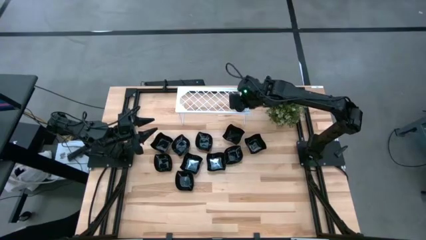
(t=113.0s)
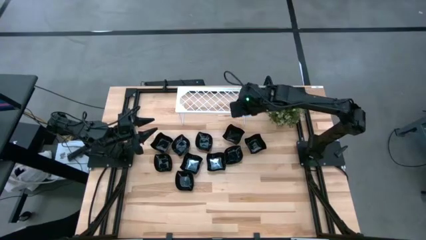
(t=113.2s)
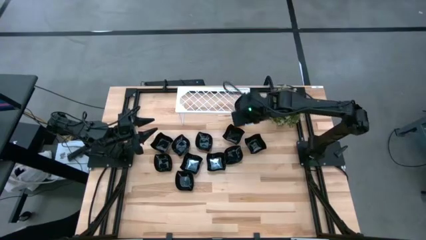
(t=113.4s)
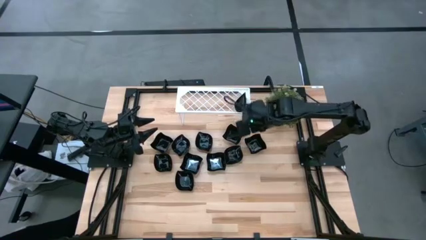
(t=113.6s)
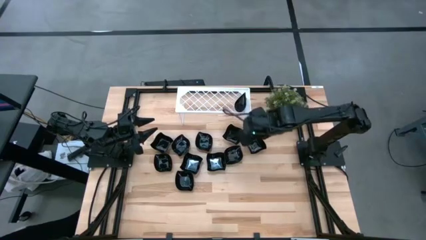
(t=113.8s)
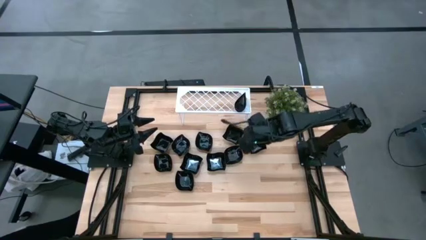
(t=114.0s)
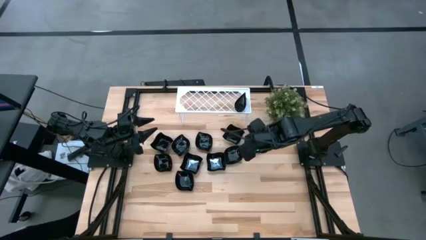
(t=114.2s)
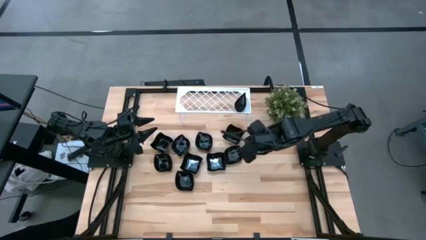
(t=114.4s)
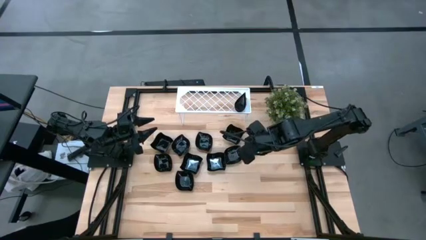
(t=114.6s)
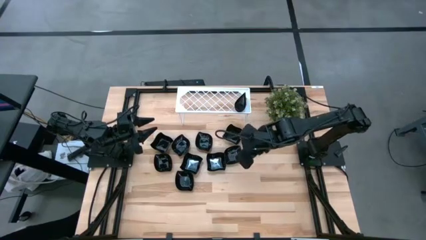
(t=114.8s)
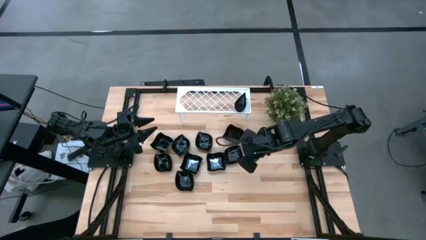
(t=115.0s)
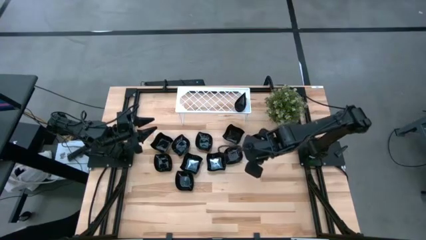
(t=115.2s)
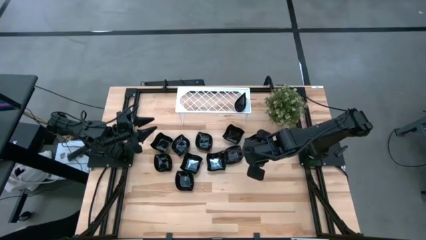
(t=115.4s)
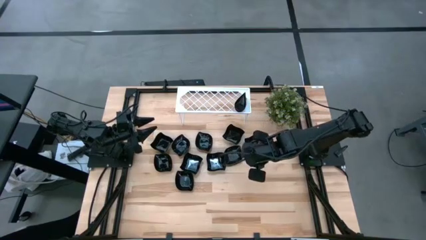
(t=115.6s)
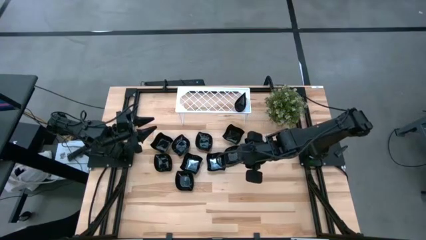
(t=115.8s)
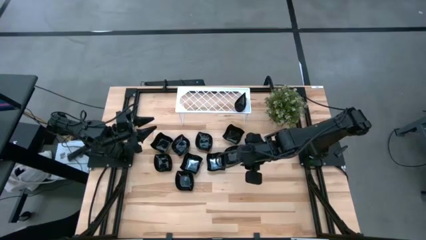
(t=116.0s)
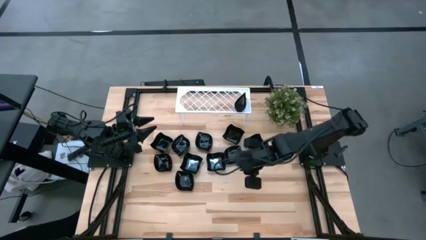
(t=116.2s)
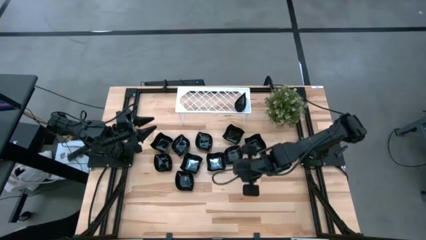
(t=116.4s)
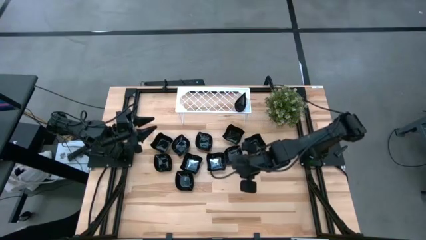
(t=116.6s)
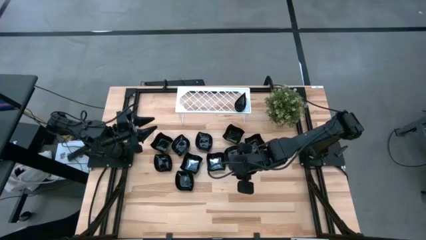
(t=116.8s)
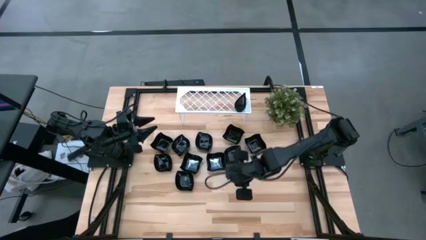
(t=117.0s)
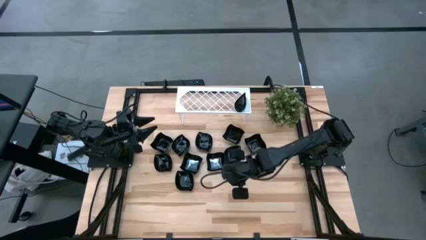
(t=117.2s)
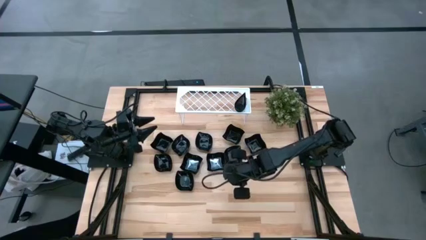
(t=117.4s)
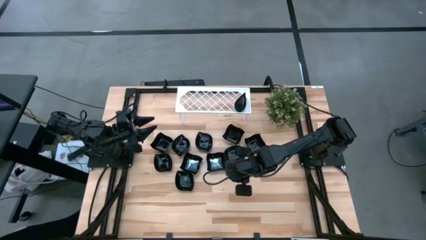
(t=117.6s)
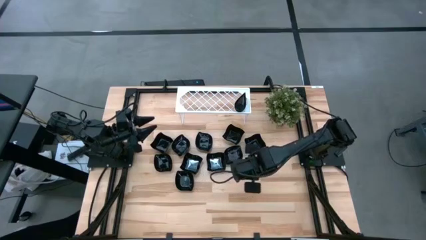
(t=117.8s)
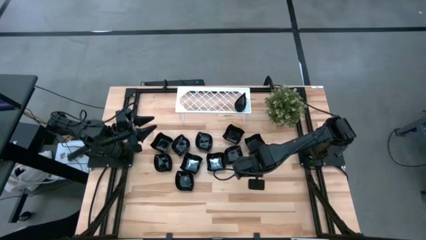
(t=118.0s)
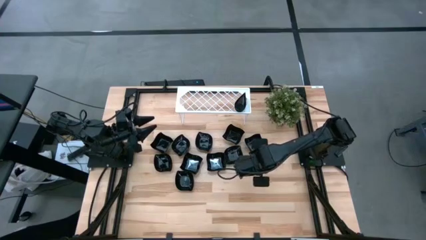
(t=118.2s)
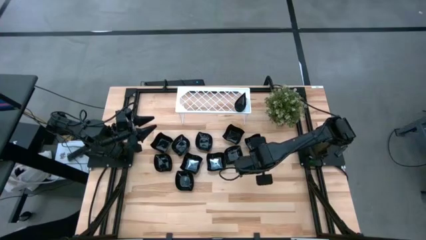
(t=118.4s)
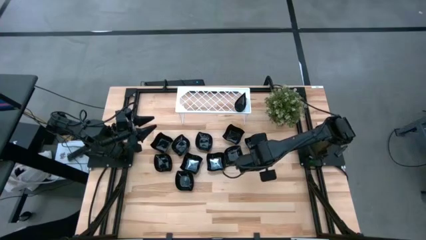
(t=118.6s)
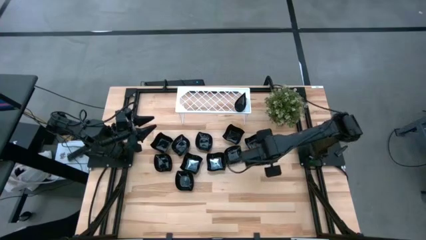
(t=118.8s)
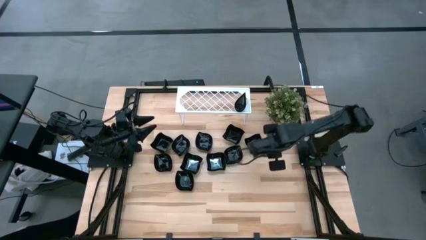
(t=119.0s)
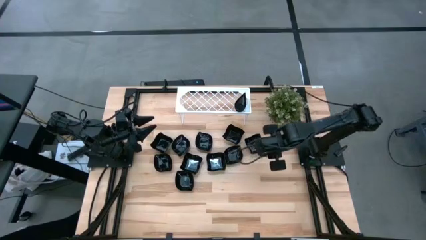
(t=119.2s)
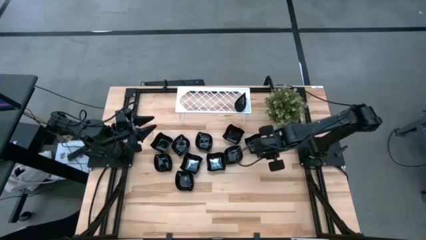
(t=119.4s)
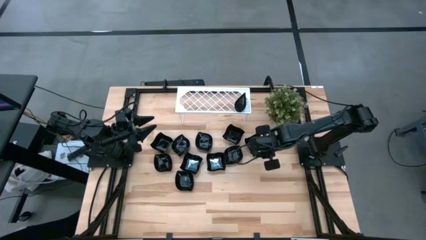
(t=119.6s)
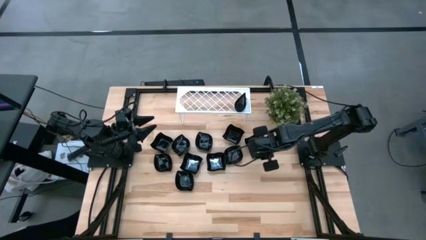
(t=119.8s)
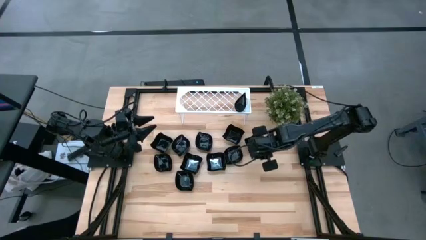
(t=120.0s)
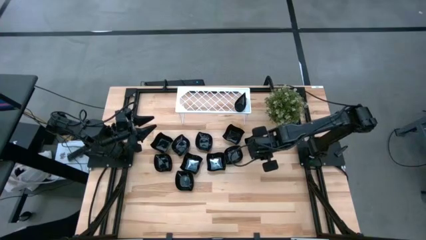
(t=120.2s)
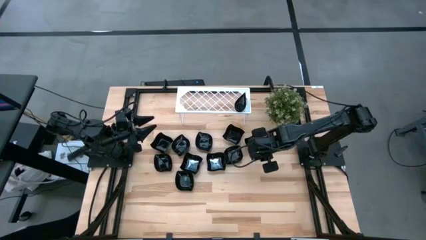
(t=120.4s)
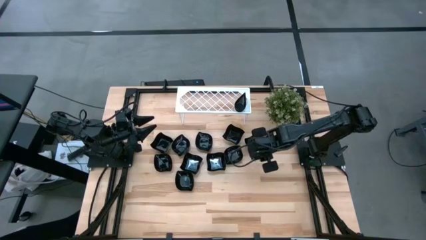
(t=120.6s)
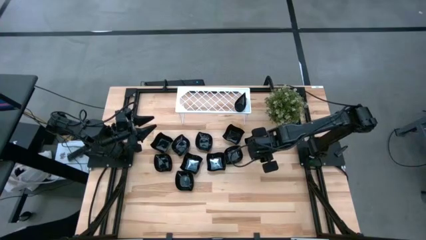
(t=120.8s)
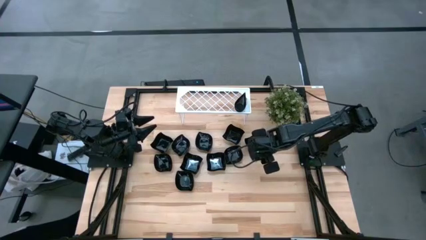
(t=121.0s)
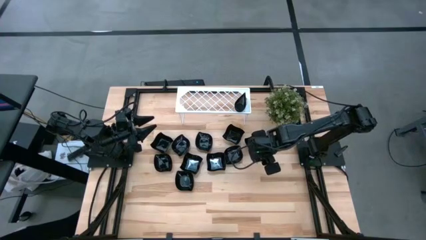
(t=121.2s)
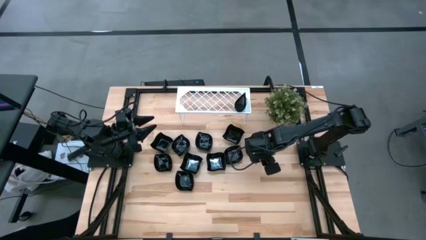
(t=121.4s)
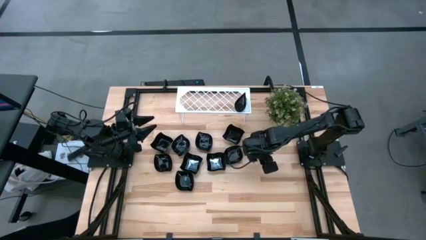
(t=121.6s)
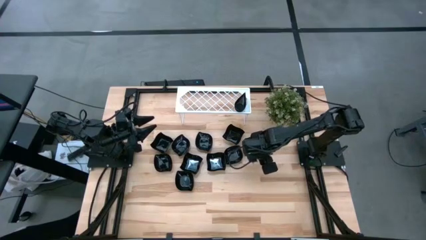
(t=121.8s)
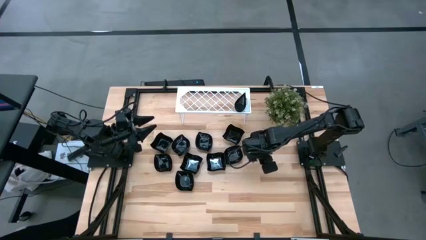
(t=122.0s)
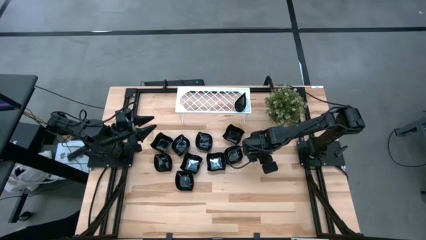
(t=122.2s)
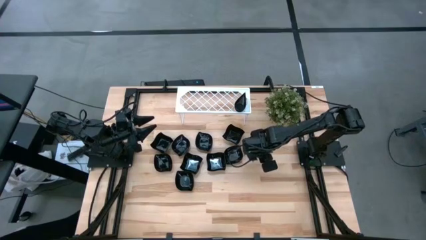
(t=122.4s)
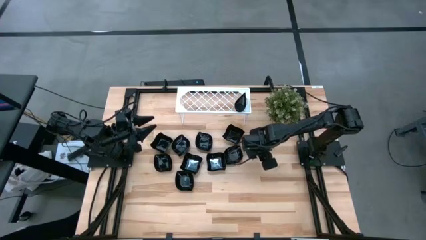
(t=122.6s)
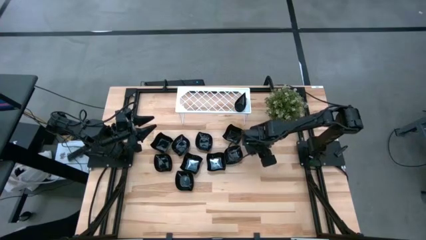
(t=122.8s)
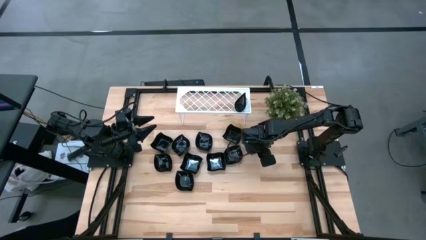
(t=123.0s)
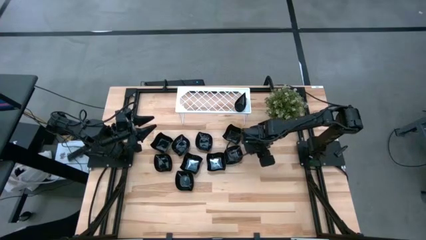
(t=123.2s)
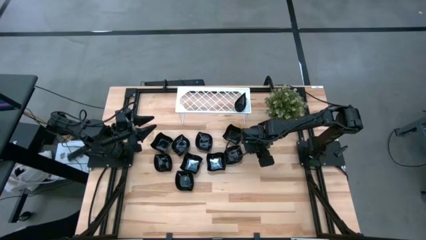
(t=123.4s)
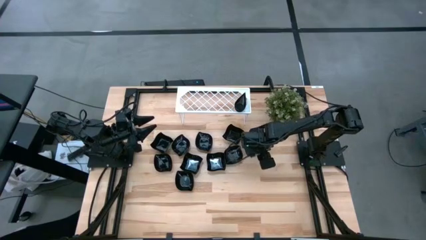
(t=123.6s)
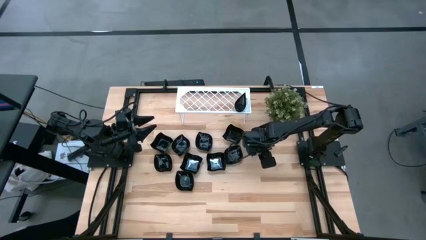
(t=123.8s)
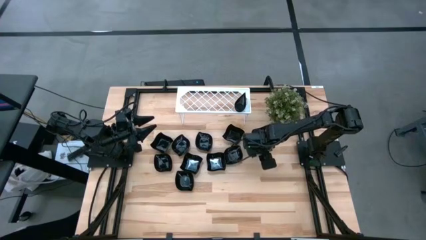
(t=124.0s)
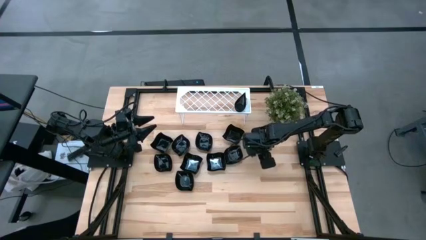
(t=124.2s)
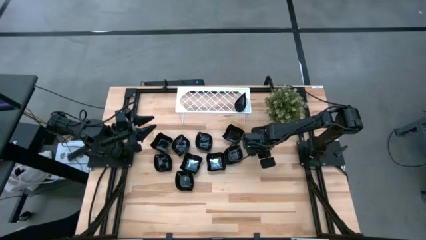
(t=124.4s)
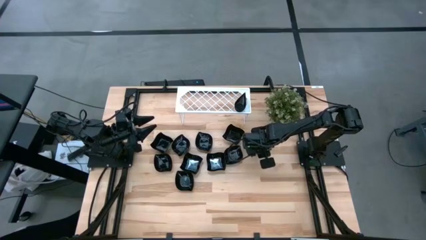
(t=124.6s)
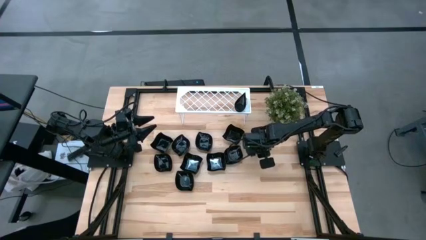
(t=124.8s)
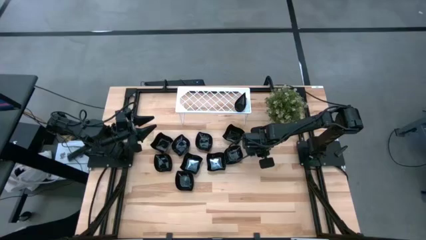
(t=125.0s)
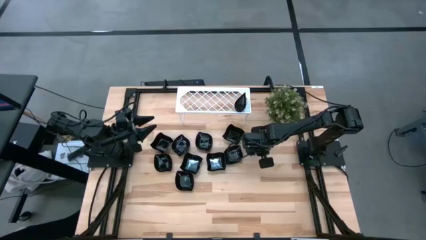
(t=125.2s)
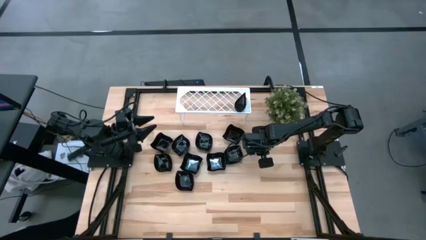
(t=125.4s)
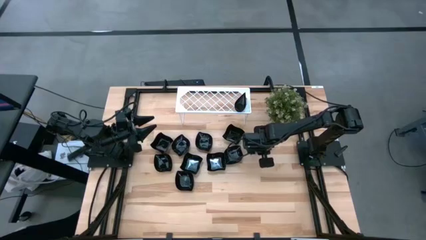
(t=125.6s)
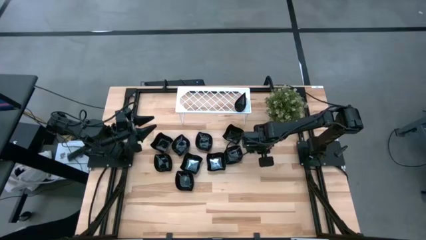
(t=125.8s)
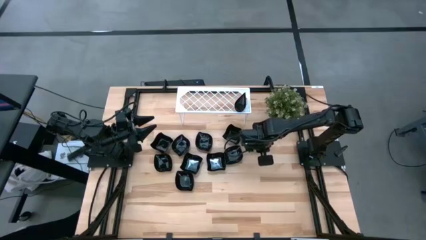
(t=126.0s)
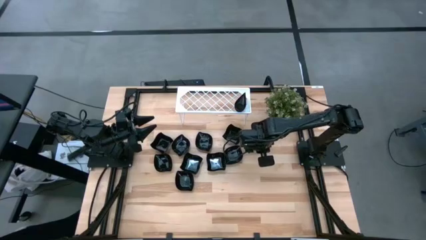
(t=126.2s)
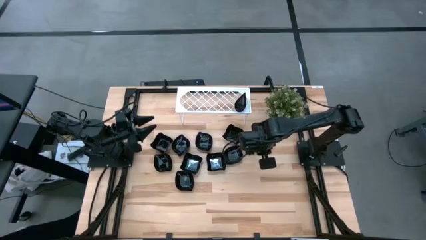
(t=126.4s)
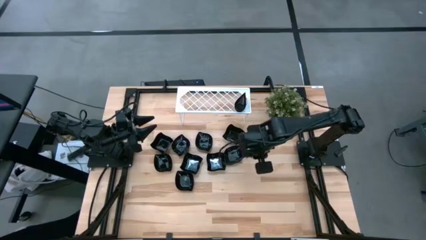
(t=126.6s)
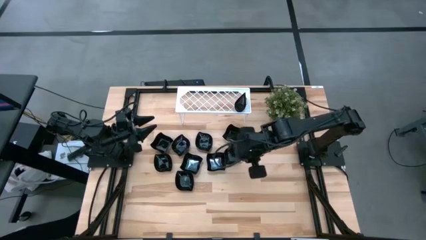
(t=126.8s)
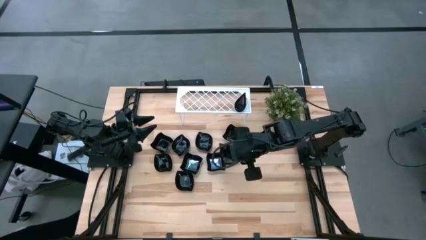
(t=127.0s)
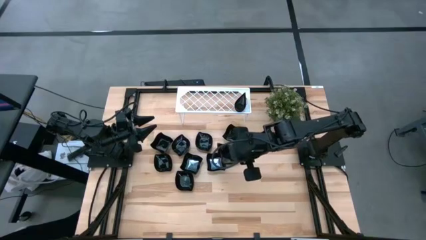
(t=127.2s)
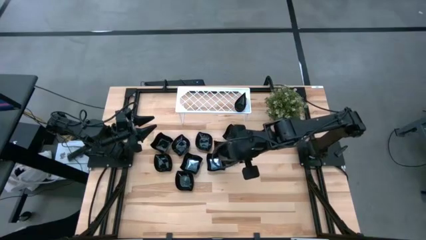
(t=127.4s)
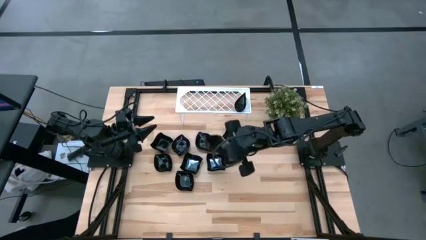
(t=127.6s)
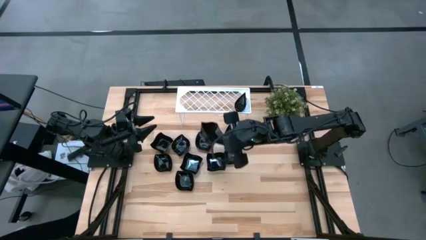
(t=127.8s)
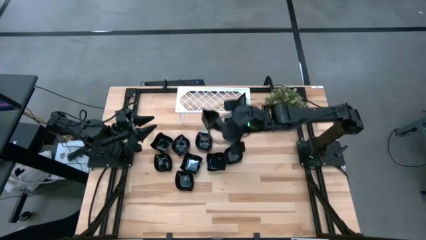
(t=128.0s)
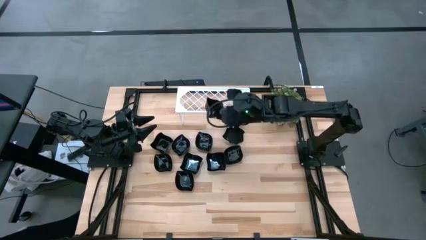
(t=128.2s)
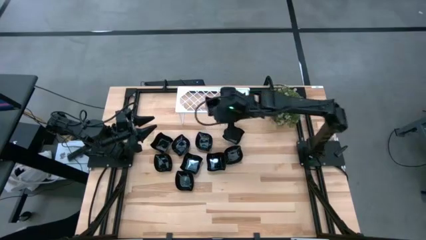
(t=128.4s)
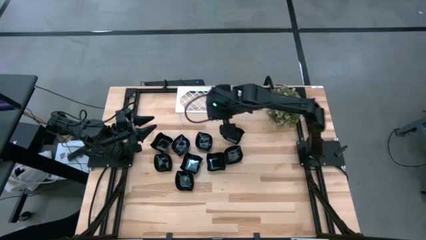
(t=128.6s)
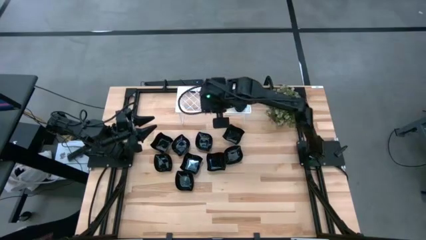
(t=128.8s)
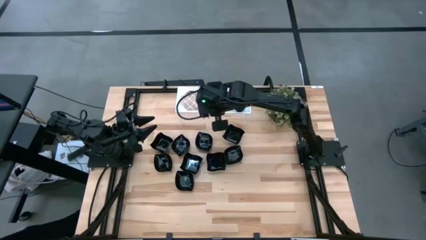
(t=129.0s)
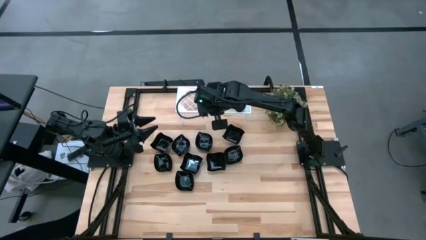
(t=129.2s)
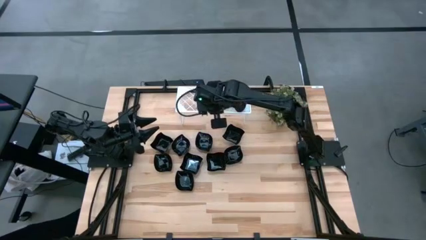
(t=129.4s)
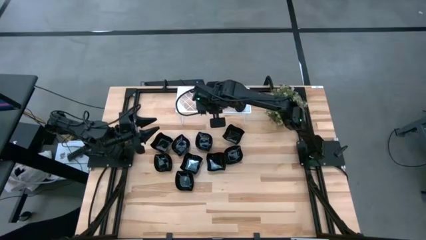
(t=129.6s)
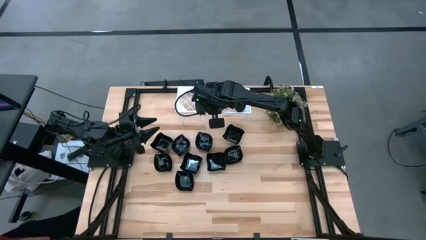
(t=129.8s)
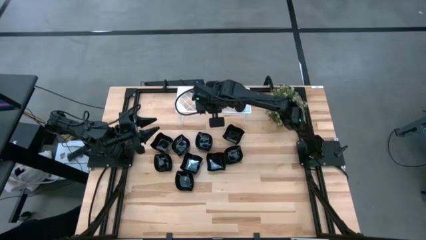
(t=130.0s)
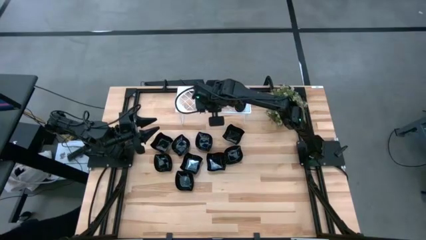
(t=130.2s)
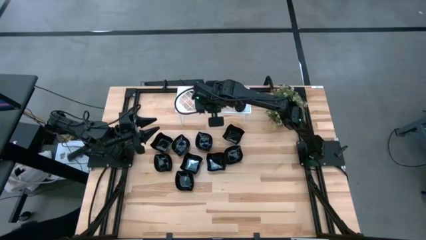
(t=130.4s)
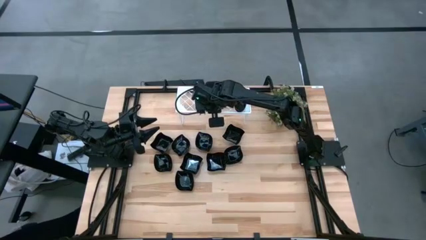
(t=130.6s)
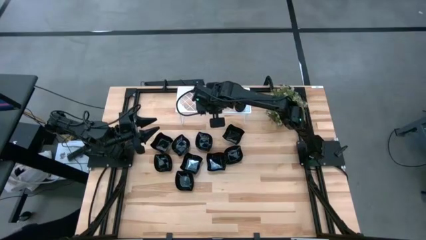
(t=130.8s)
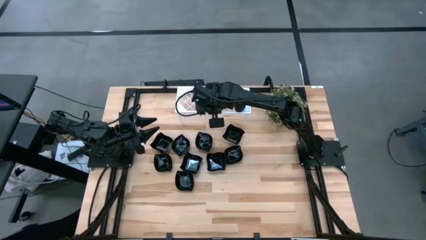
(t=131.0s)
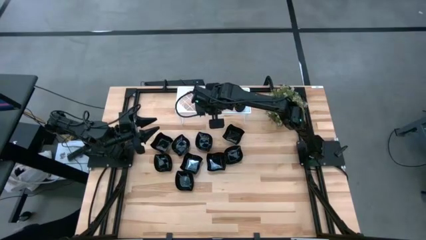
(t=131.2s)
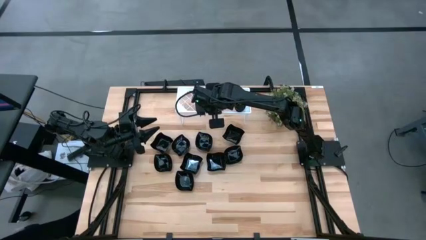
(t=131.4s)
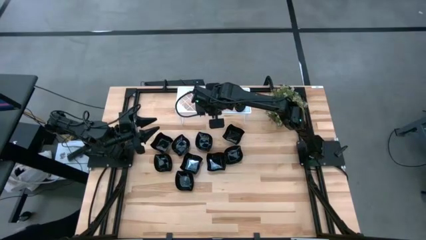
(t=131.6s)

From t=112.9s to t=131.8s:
Task: Pick & Place Mini shaped plates
Put the distorted square plate on the shelf
